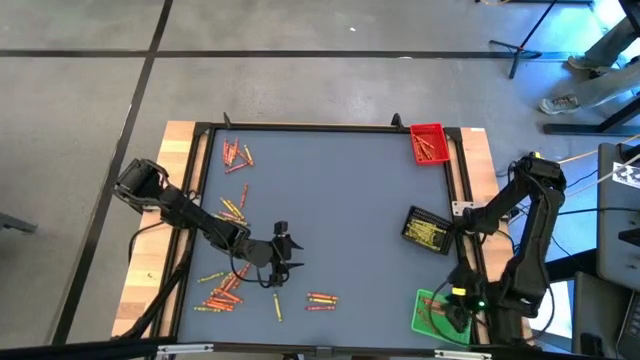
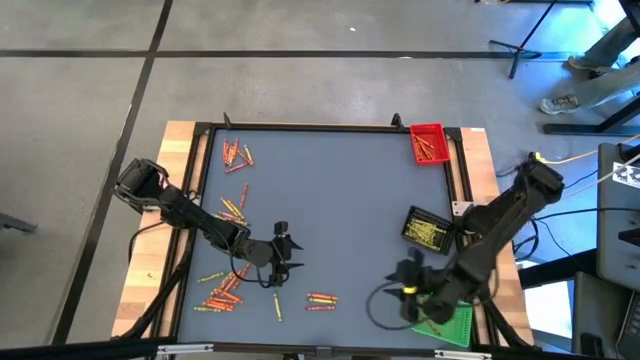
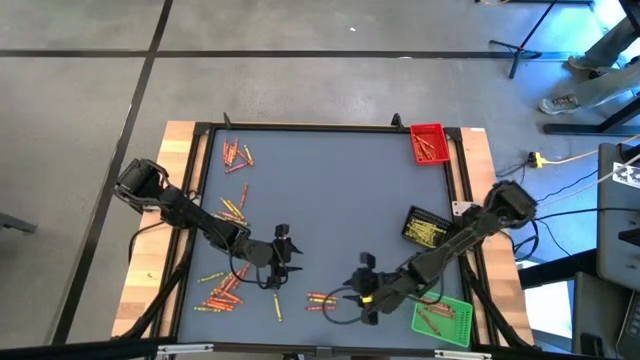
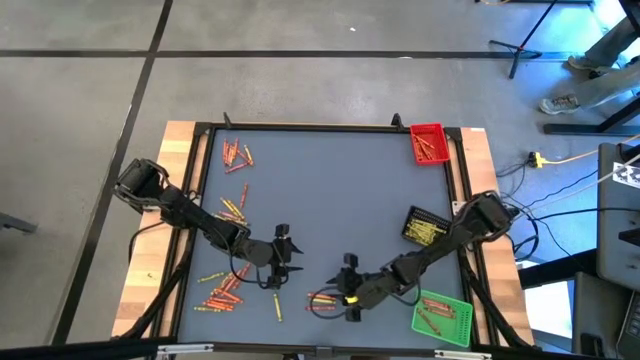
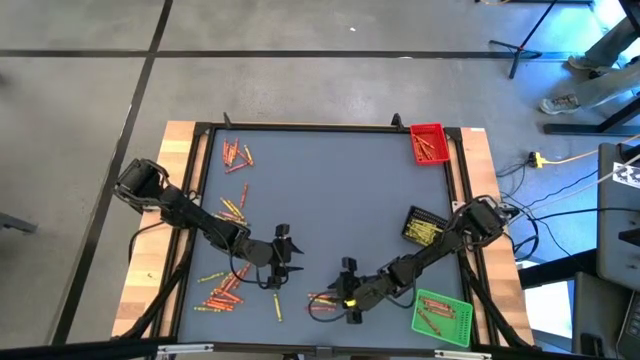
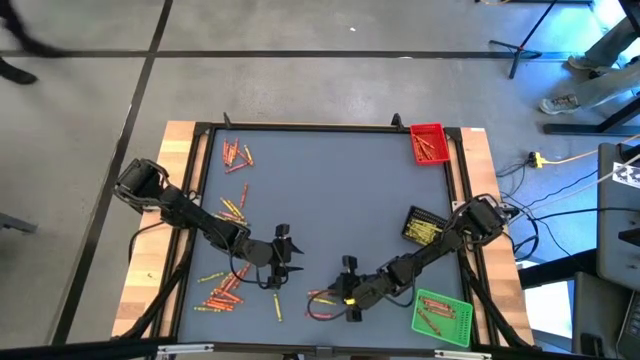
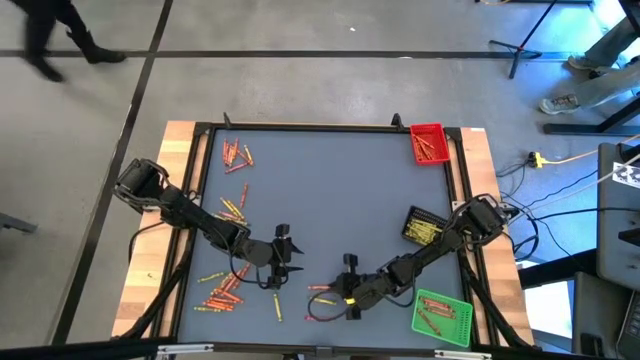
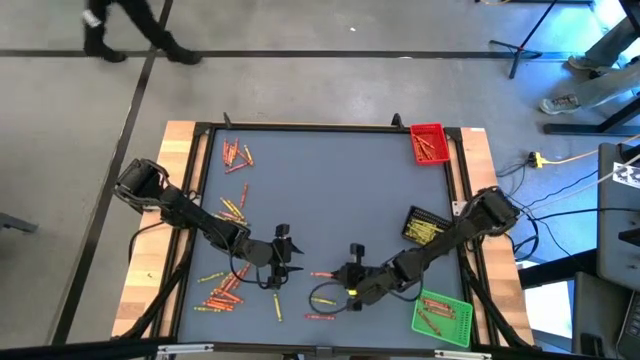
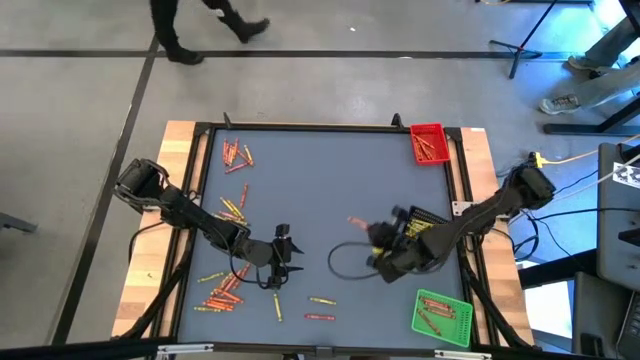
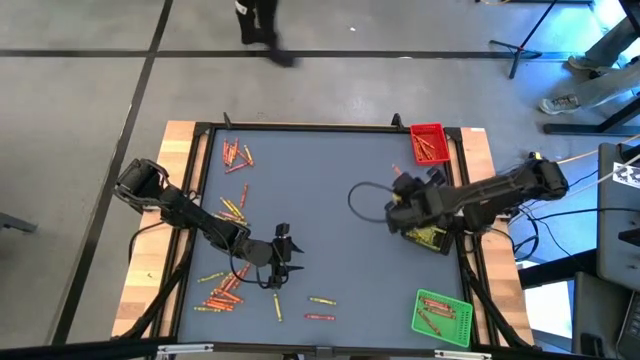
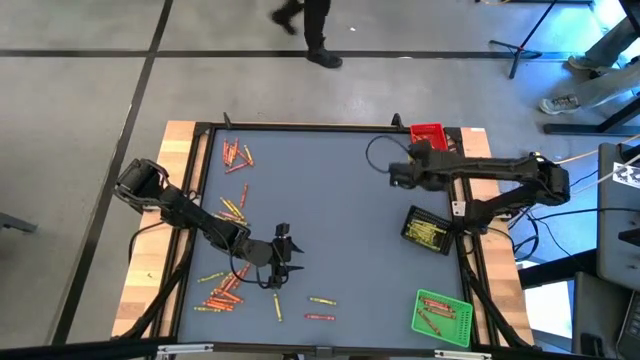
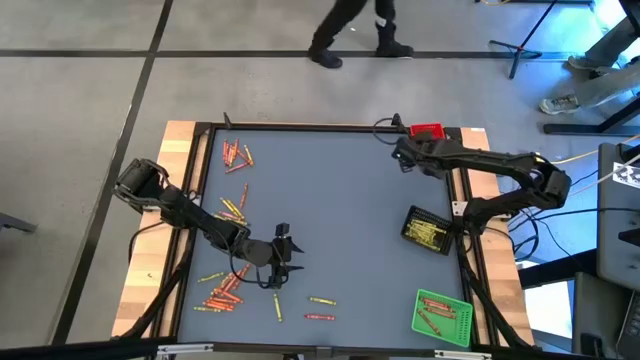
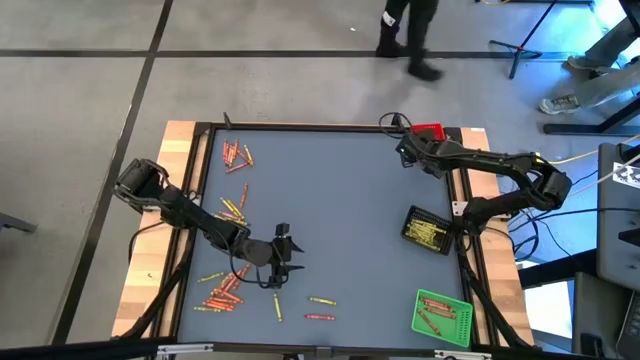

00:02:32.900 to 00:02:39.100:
Task: Sort crayons
Put the orange crayon into the red basket

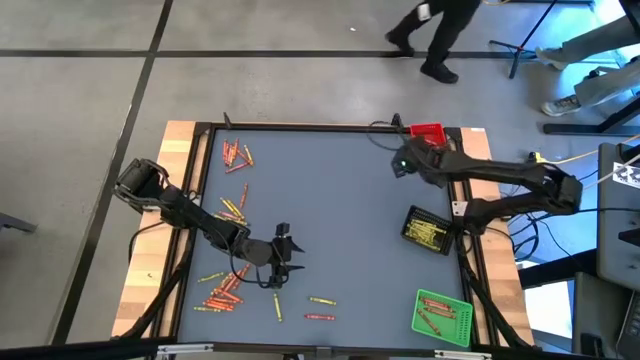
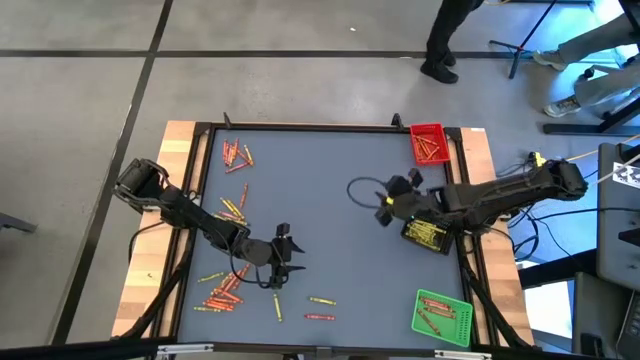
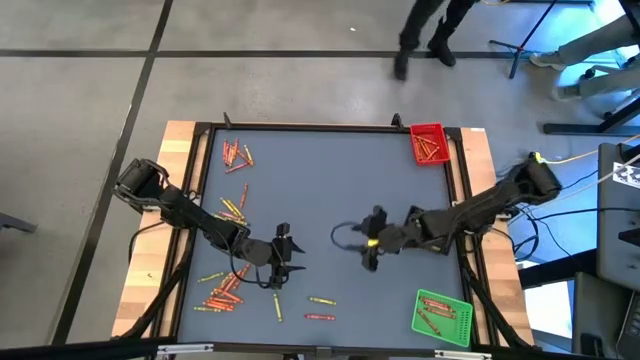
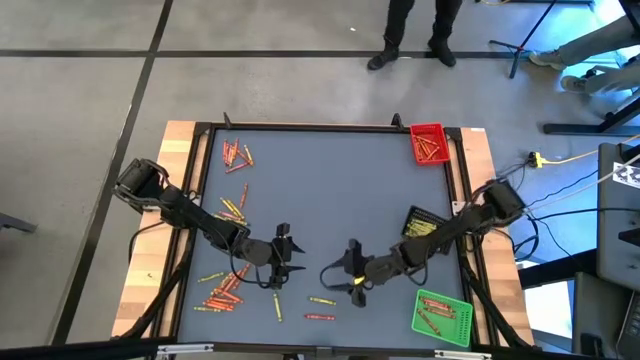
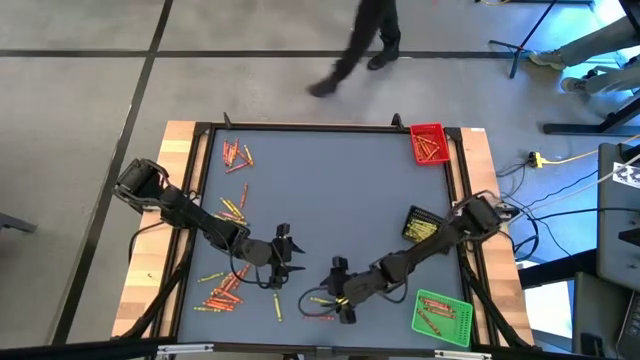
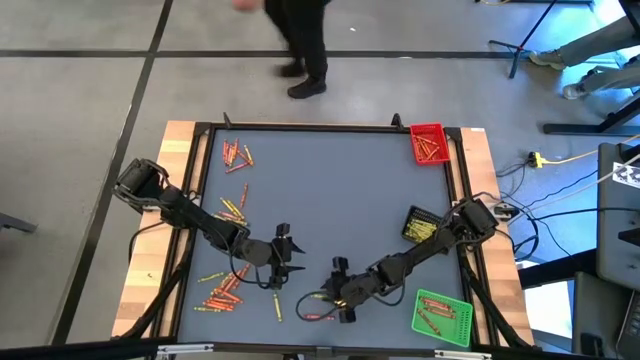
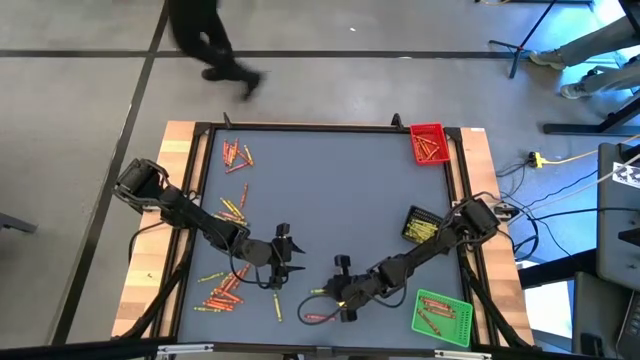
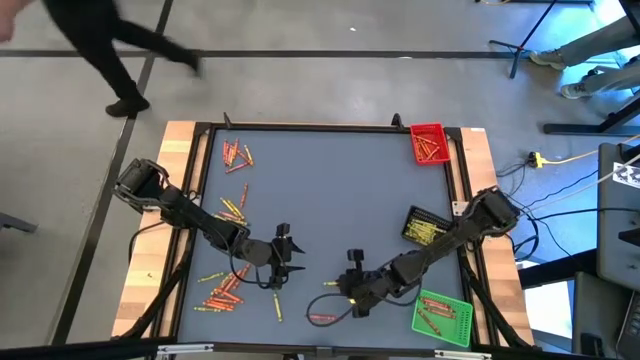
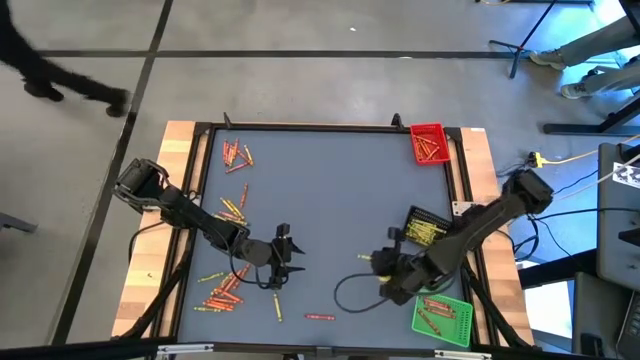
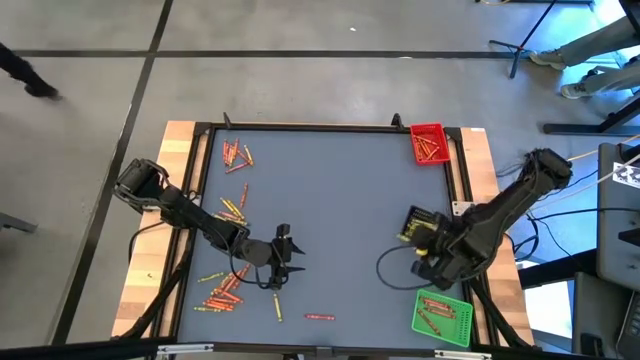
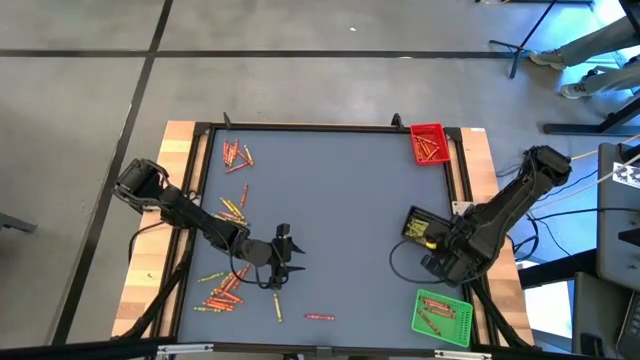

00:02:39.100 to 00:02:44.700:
Put the green crayon into the black basket

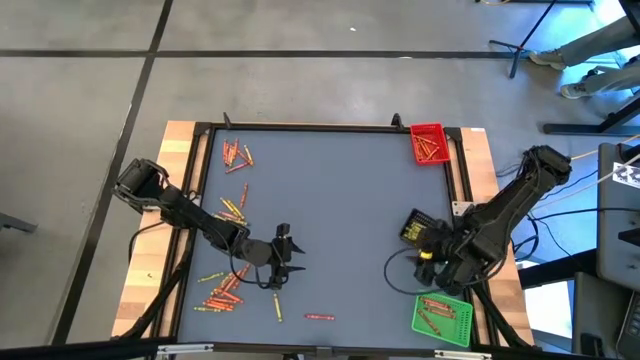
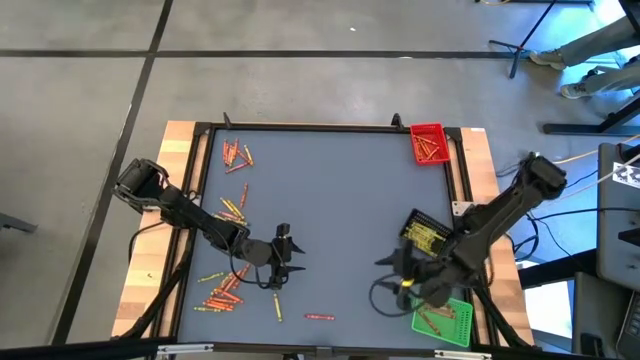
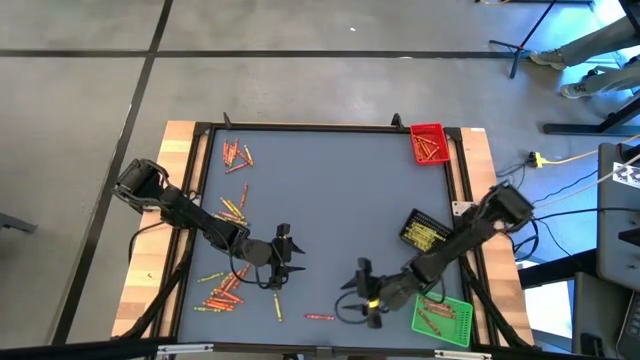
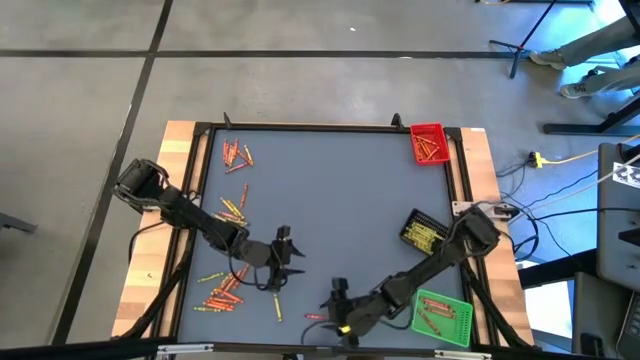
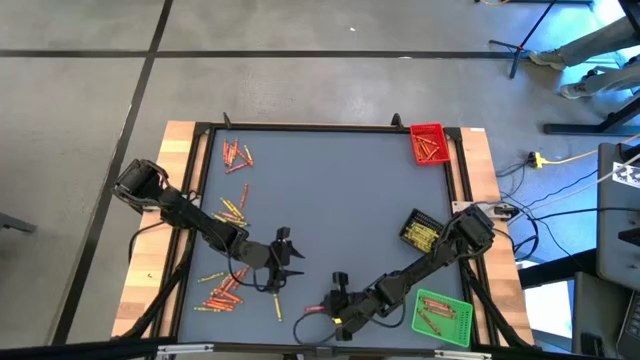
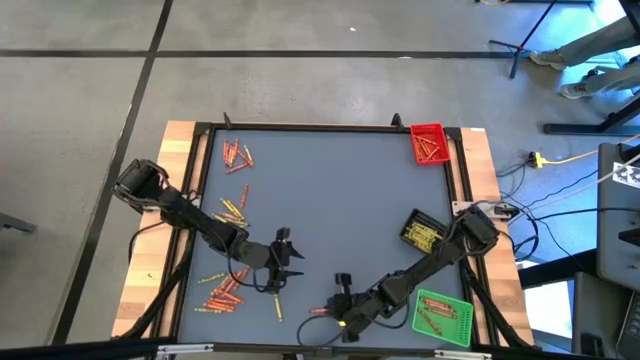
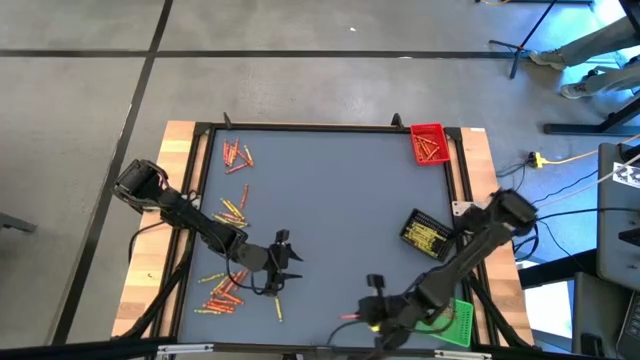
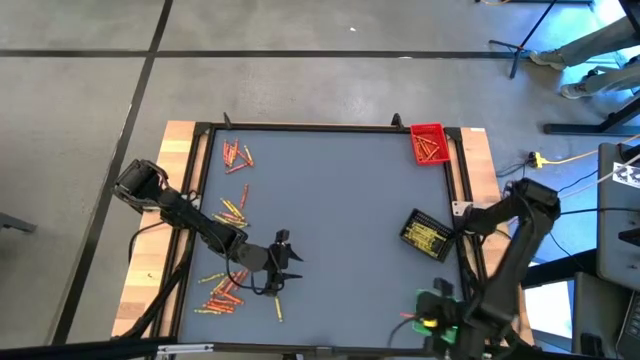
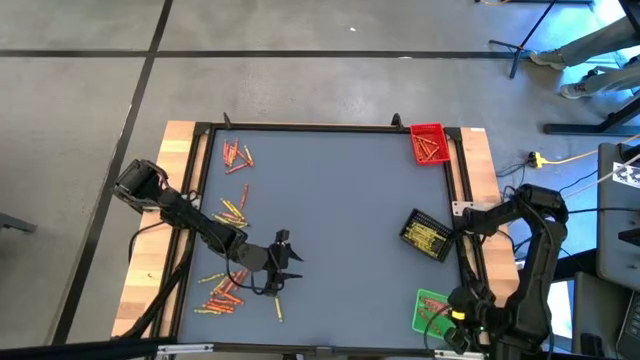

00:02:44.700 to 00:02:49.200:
Put the red crayon into the green basket

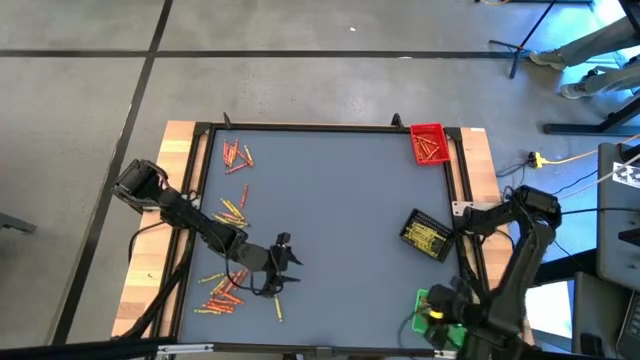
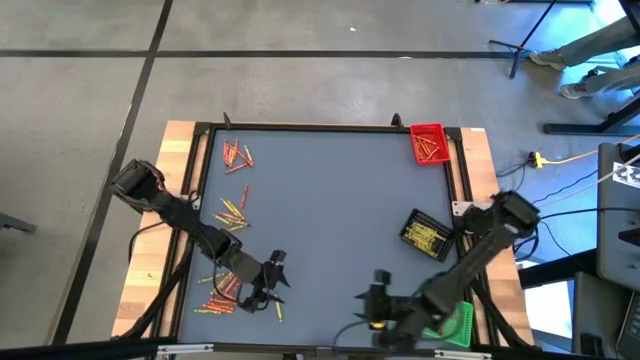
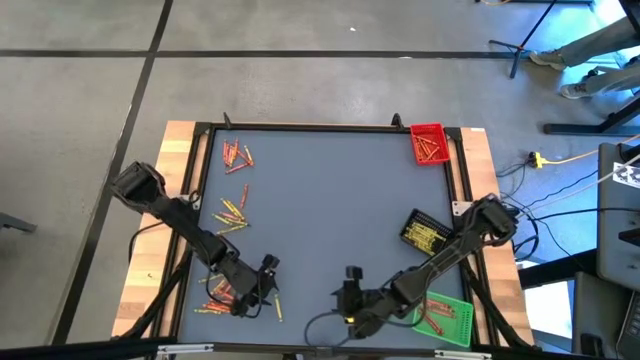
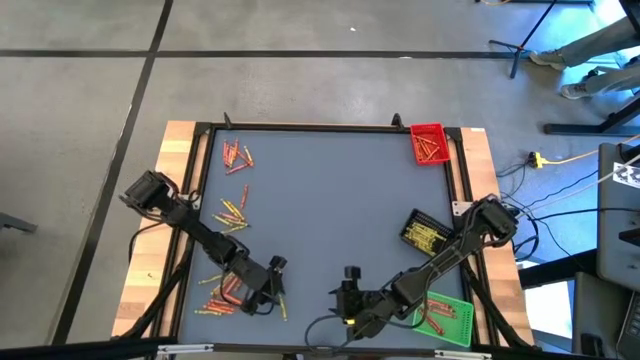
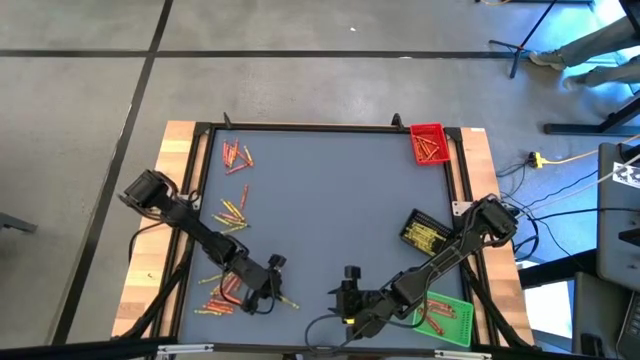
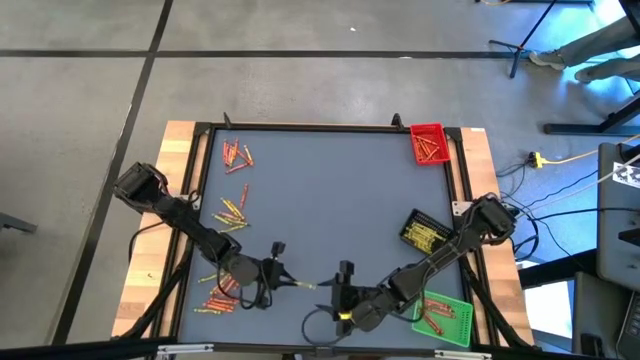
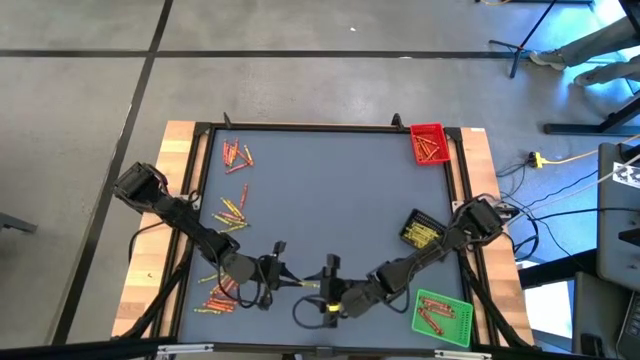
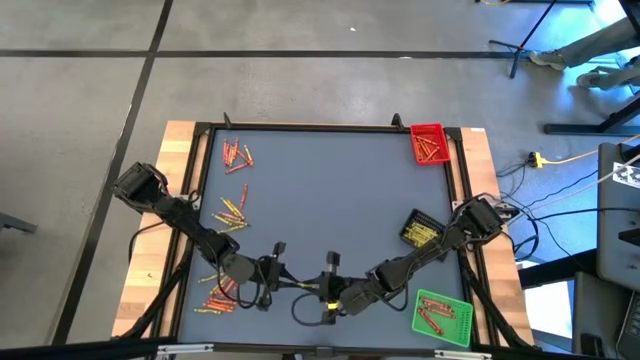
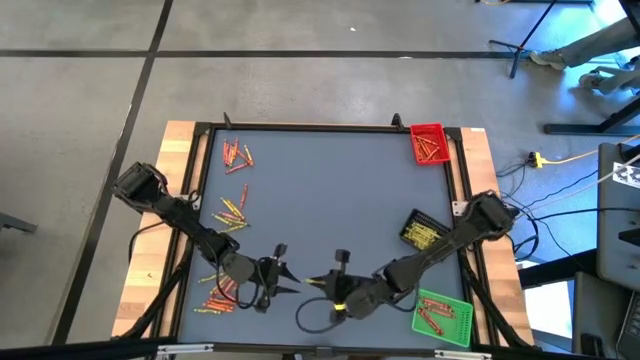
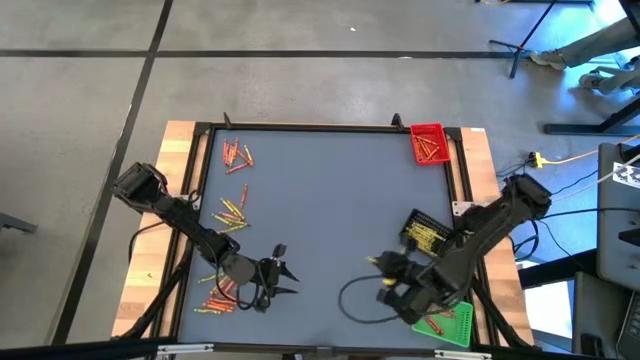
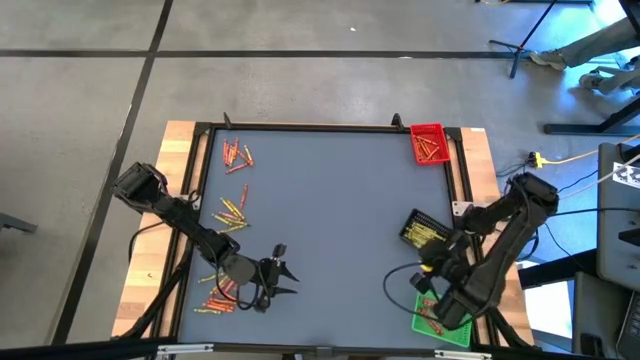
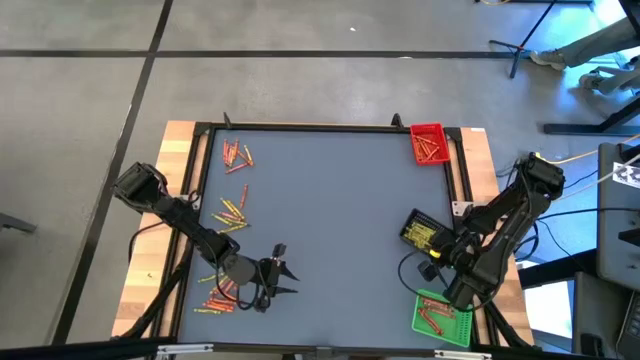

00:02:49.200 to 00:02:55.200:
Put the green crayon into the black basket
